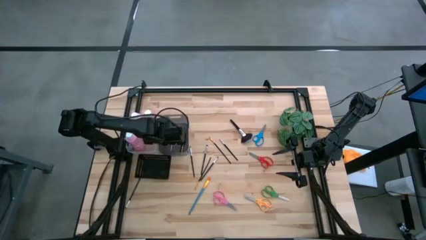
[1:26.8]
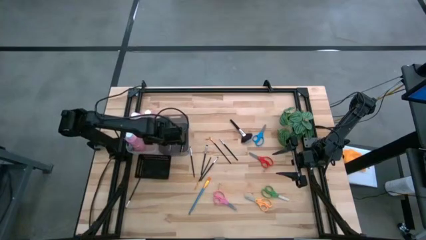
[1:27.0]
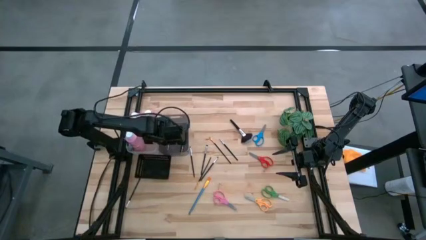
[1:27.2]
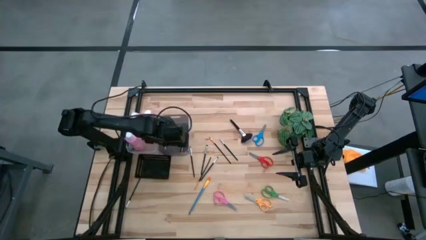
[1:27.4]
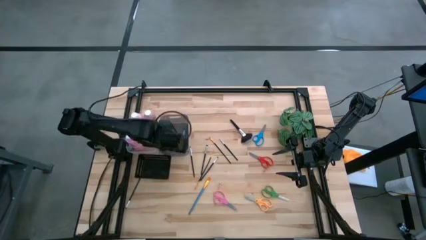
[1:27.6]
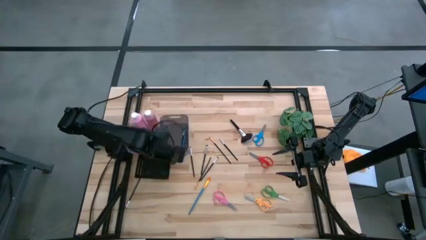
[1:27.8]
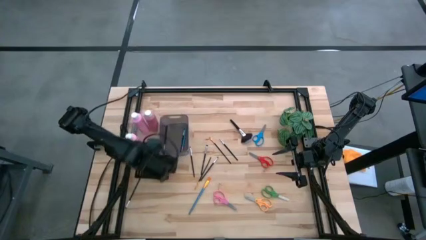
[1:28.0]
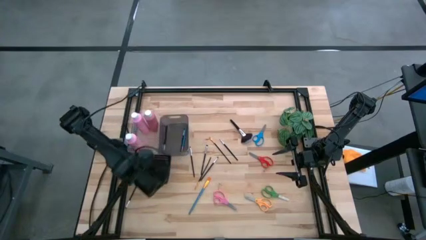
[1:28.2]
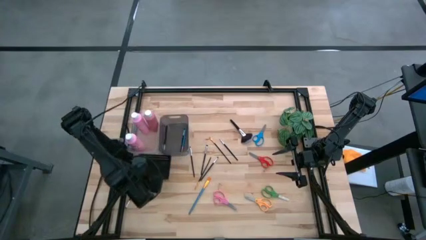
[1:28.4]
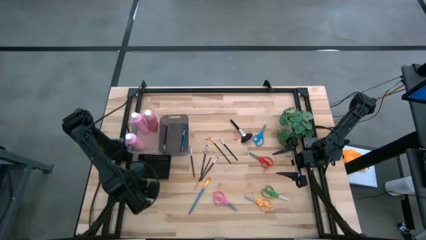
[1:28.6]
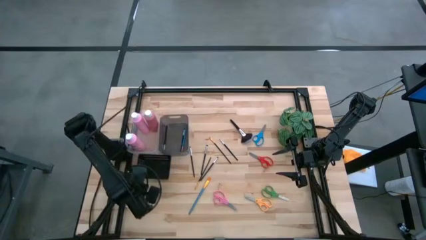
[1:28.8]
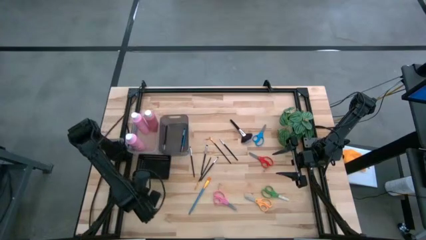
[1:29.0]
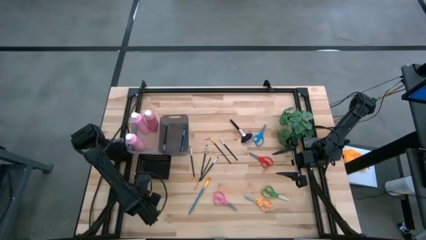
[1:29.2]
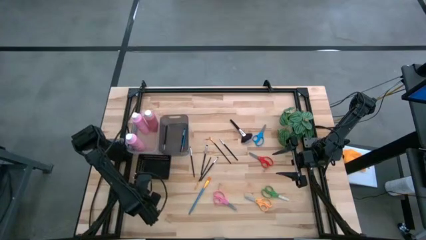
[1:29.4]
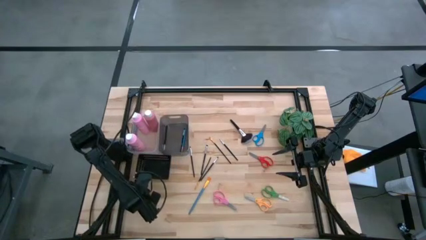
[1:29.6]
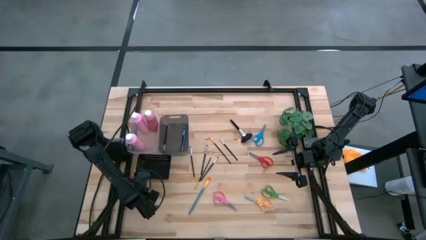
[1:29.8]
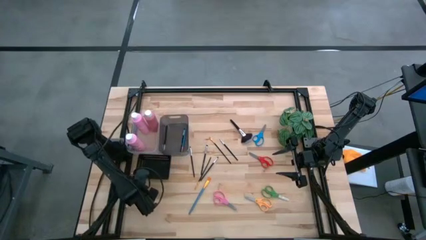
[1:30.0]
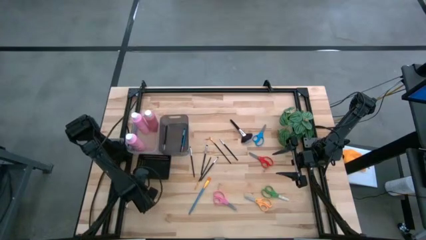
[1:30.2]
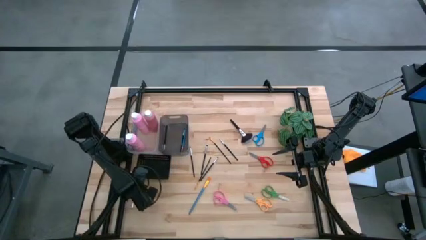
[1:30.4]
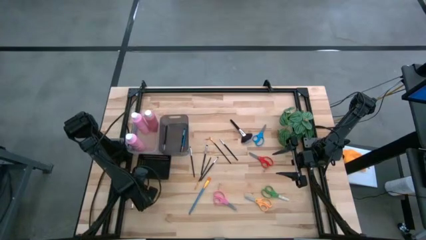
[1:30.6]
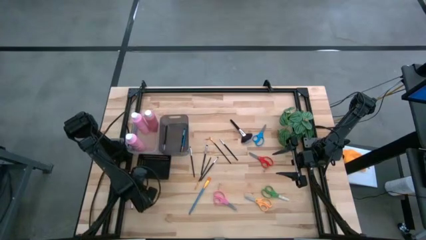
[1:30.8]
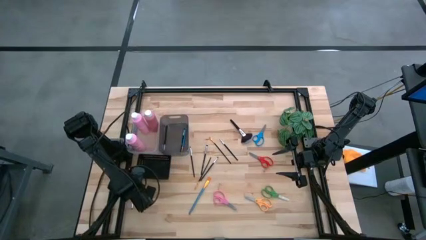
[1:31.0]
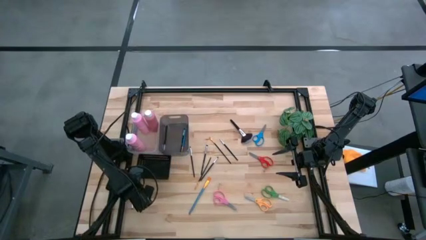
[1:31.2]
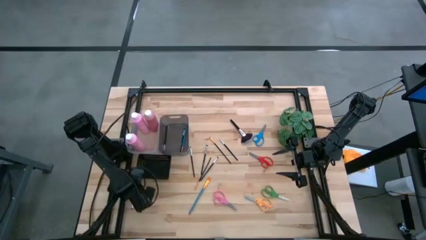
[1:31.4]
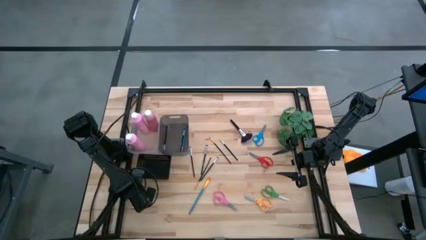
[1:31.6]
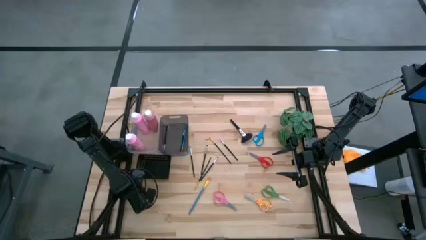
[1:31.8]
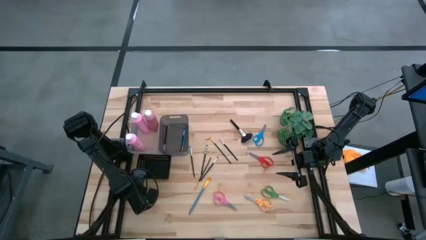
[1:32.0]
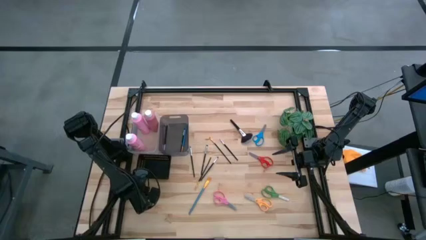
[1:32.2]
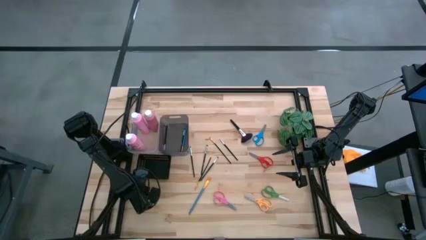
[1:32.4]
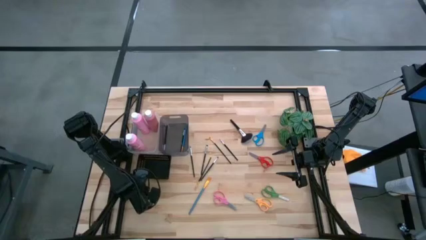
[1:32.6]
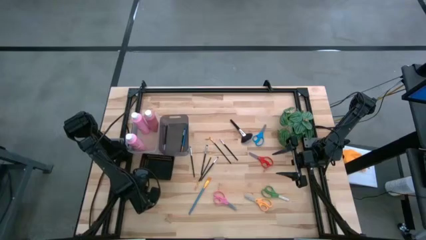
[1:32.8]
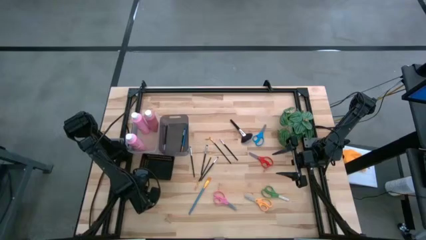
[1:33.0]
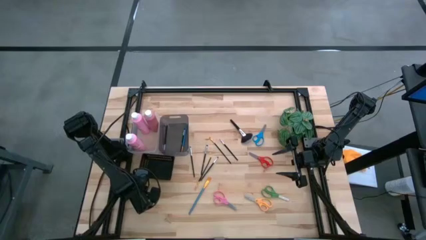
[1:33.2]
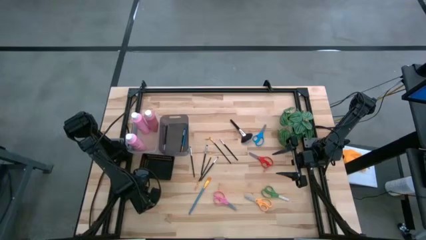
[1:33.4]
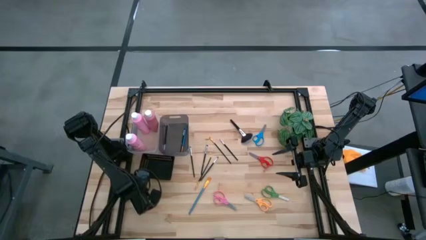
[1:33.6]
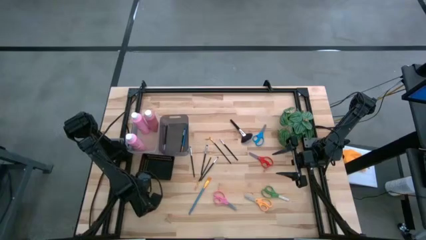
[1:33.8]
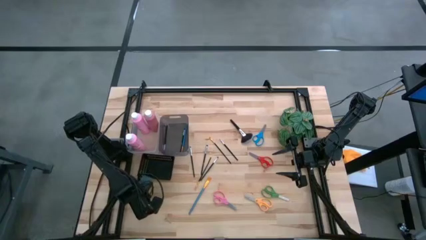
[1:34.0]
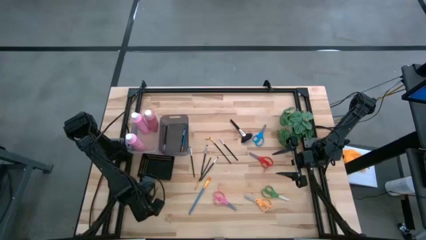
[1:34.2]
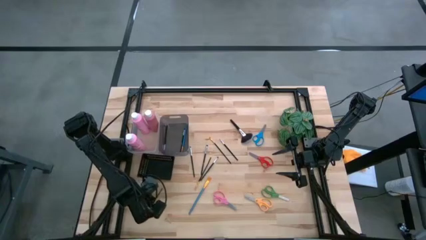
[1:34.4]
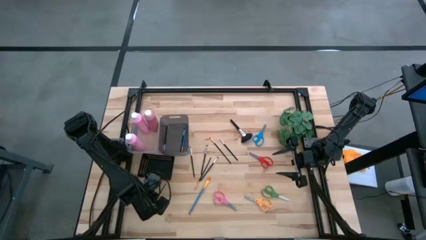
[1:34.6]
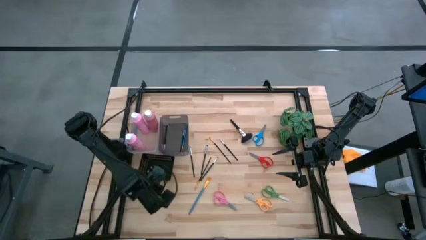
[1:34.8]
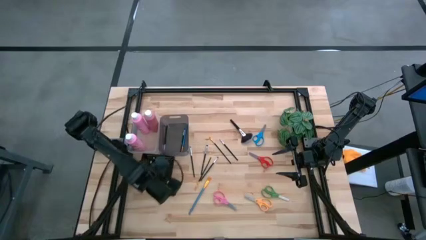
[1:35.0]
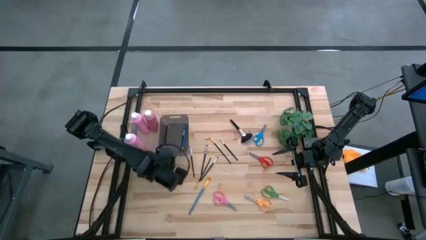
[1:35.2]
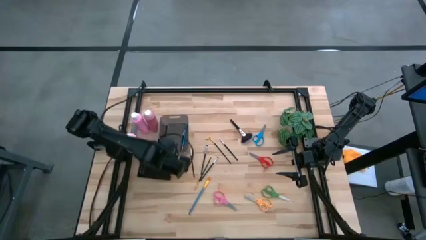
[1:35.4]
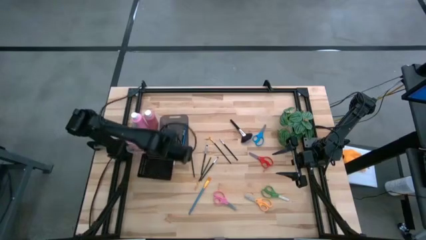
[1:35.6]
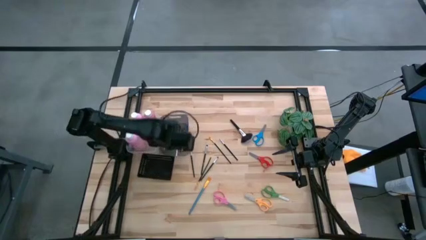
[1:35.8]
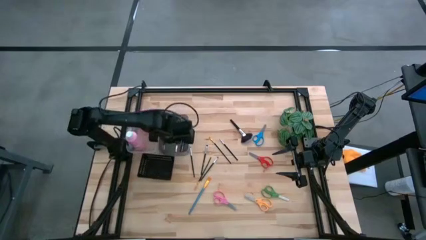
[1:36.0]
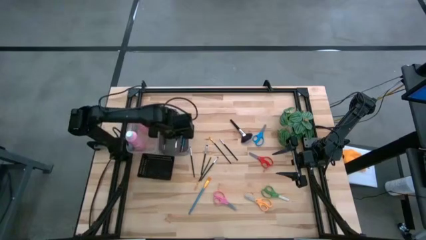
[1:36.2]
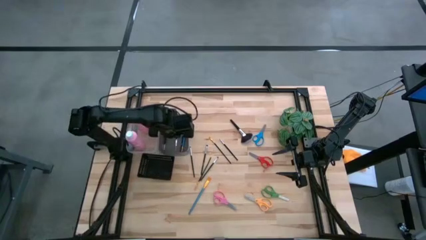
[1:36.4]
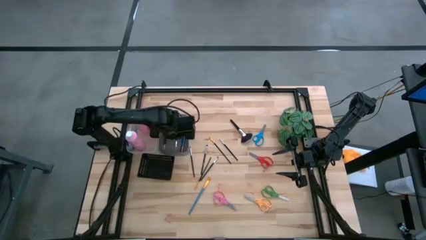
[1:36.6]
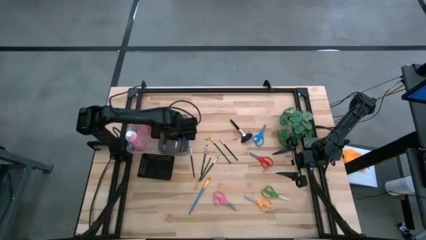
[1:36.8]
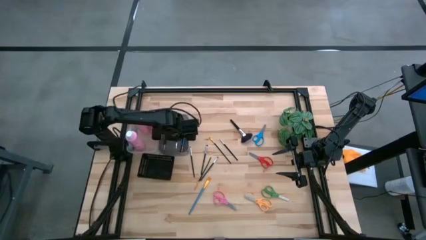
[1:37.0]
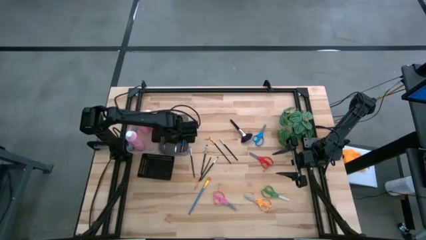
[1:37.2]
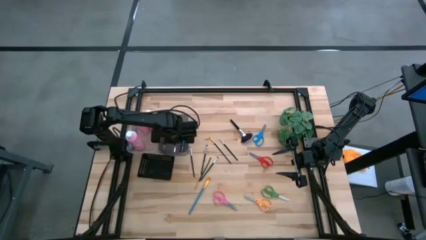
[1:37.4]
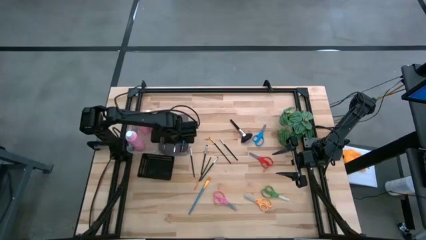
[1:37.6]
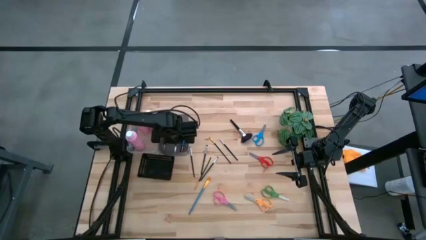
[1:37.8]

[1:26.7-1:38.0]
Task: Pick & Place Paint Supplies
Put the black brush into the black bin
